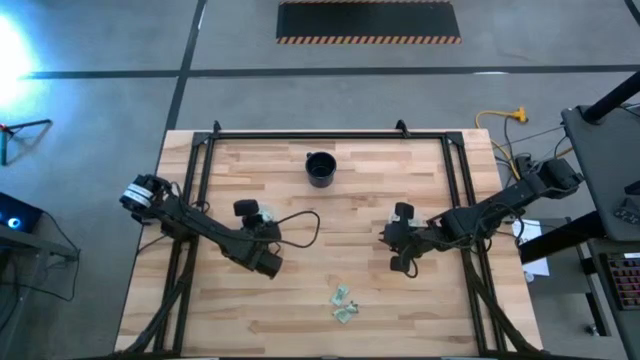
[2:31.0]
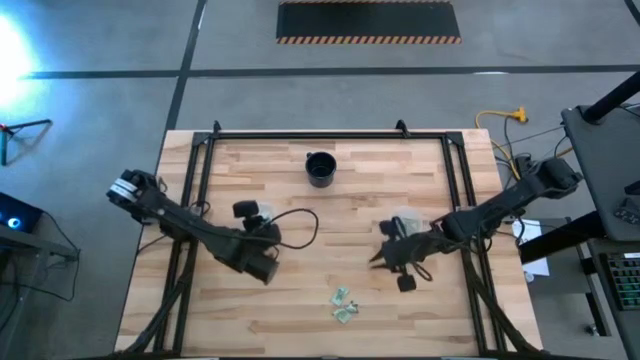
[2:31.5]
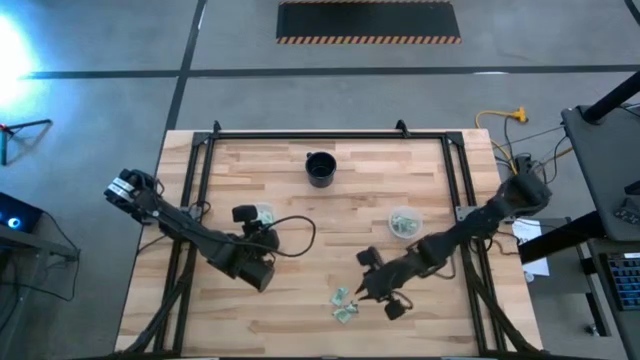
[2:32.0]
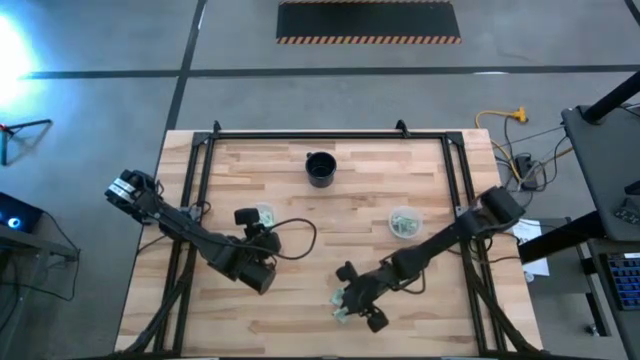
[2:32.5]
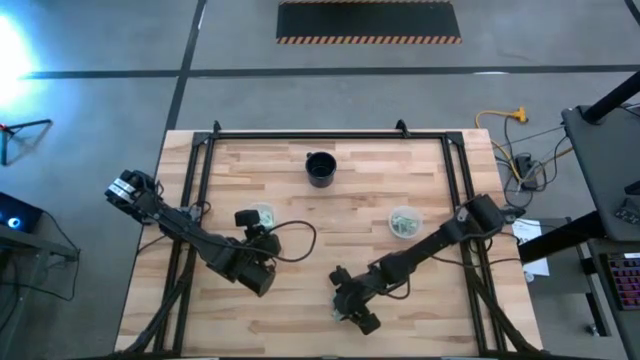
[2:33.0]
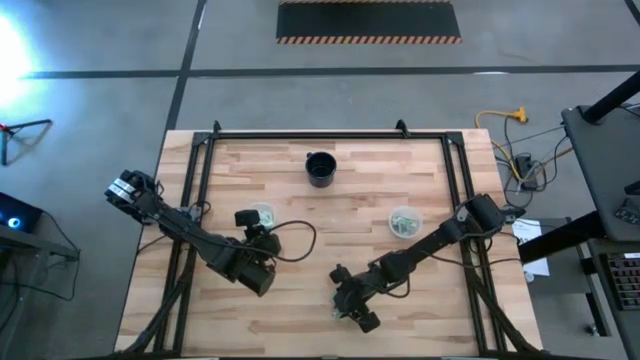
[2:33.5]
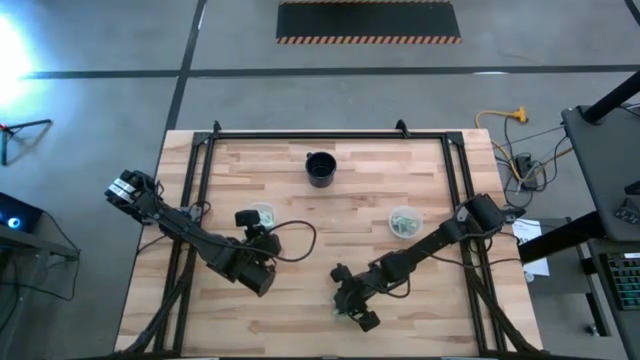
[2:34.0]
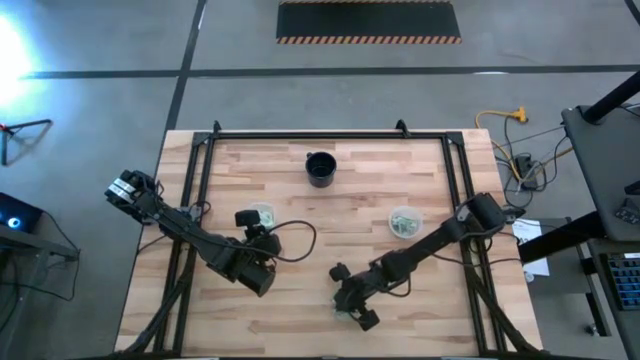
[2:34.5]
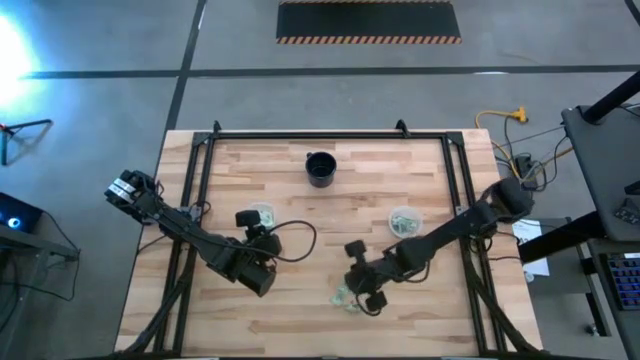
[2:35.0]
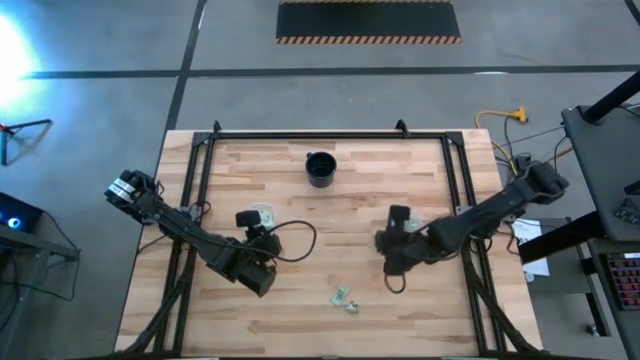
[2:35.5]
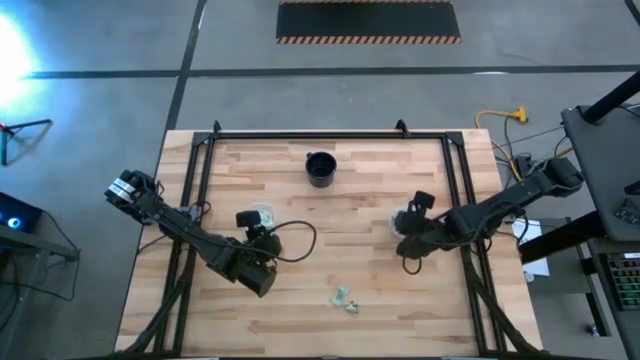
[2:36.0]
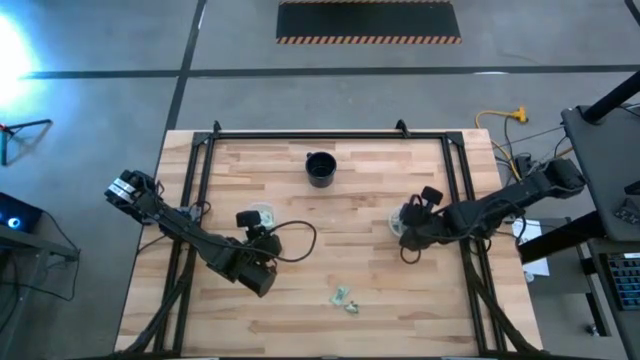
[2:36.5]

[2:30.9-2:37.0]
Task: Pick and place Stevia / Truvia into bins
Put the light green stevia packet into the circular container

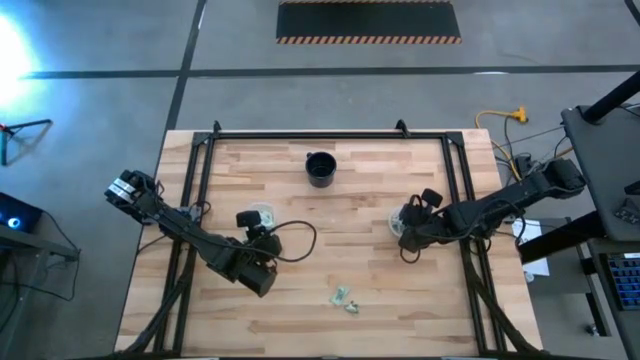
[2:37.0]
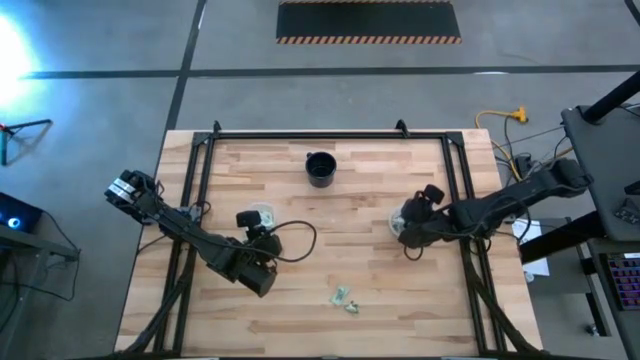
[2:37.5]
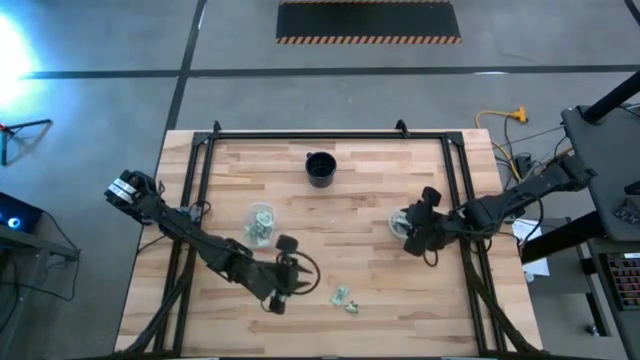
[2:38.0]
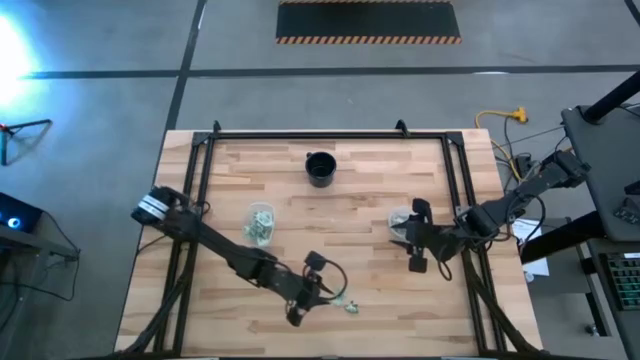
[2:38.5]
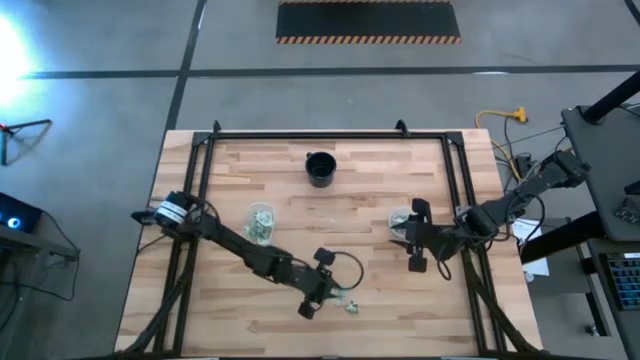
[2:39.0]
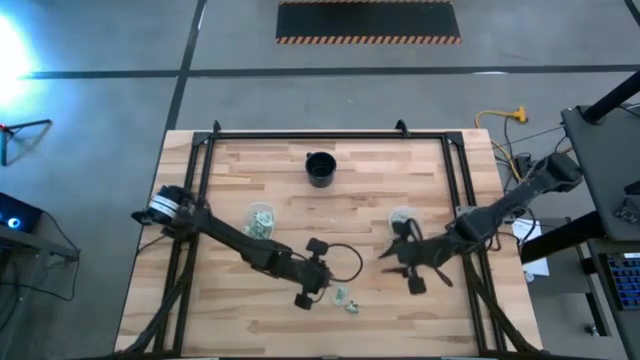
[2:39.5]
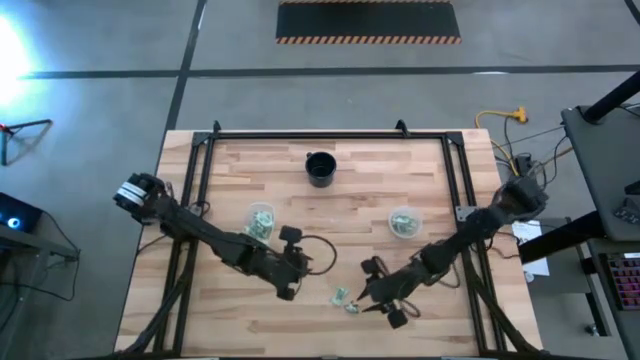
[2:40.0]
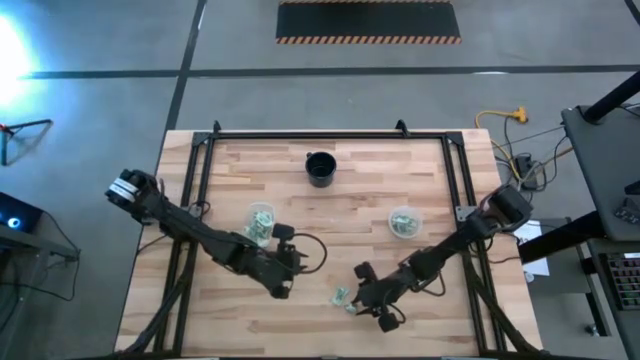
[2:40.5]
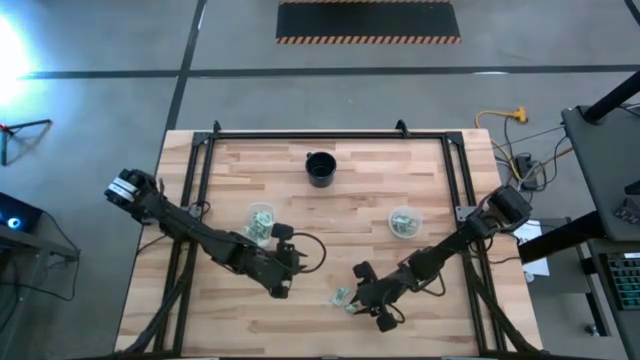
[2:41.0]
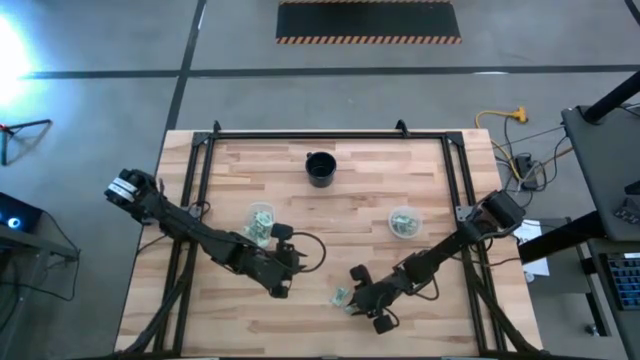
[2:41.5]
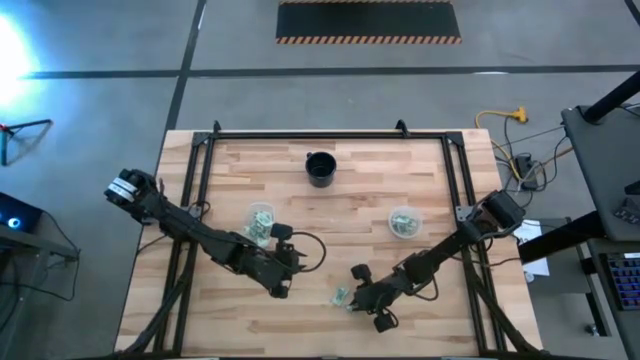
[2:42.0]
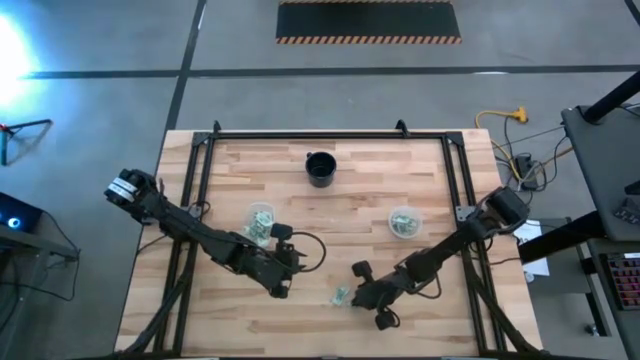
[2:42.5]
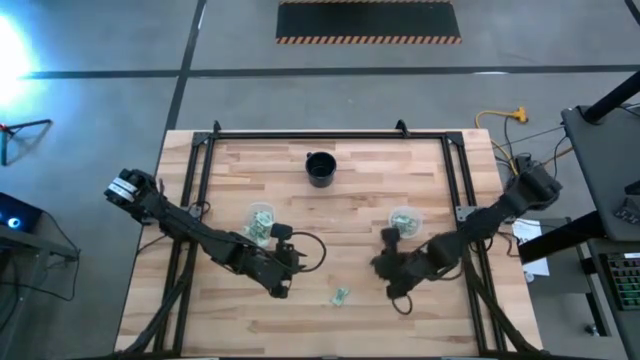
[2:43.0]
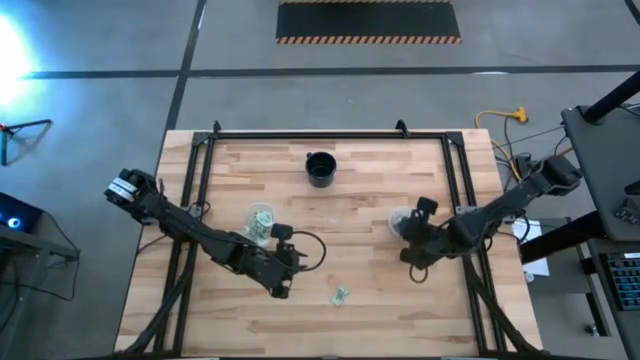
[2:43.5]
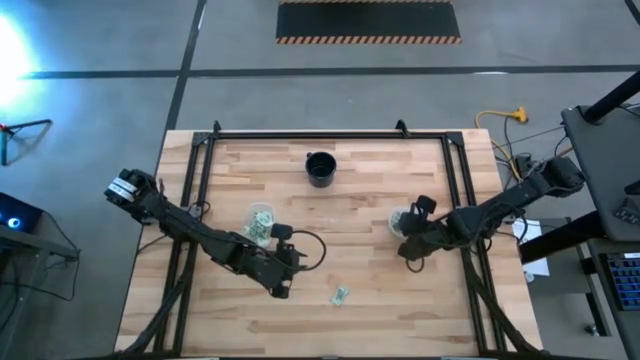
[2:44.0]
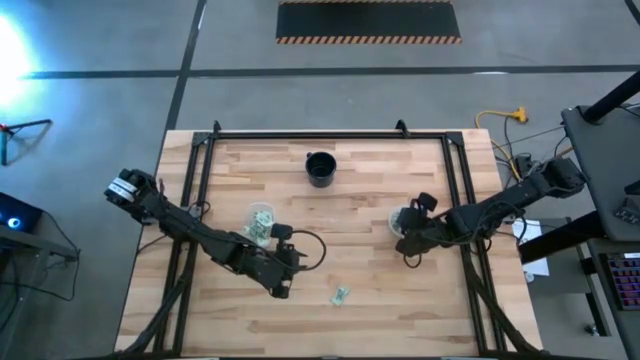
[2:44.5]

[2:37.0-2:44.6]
Put the green stevia packet into the circular container

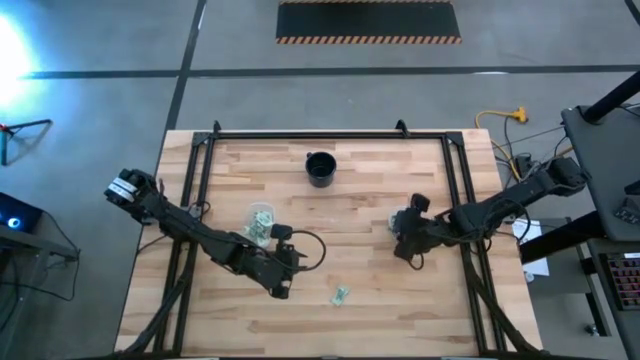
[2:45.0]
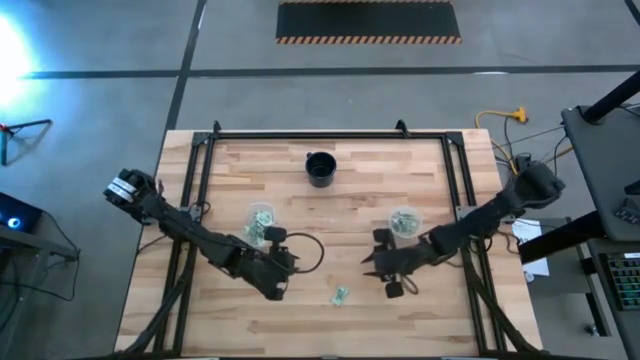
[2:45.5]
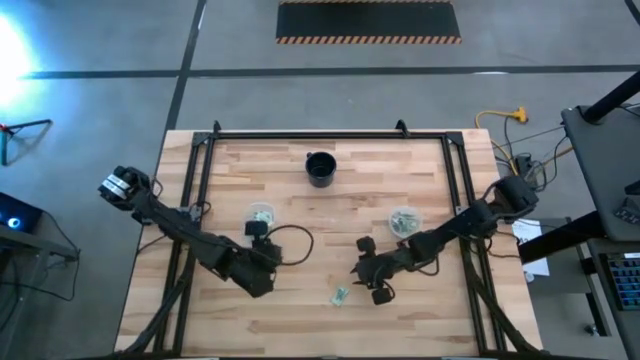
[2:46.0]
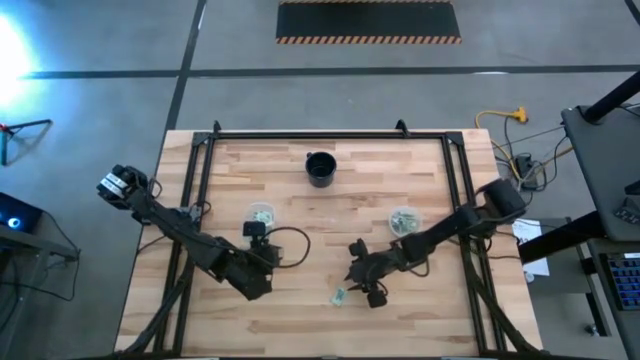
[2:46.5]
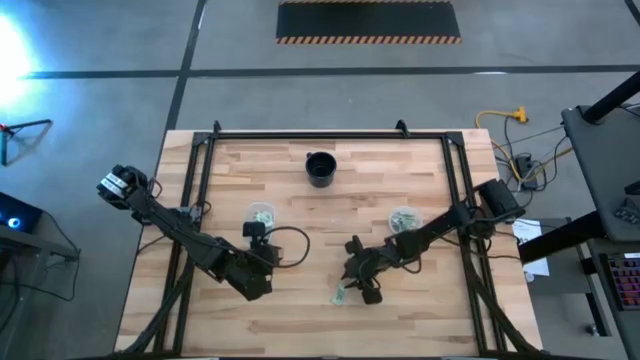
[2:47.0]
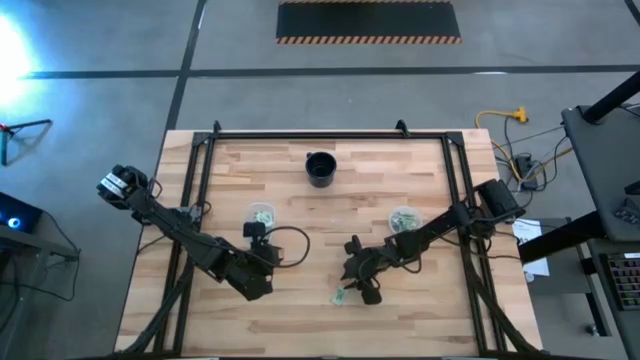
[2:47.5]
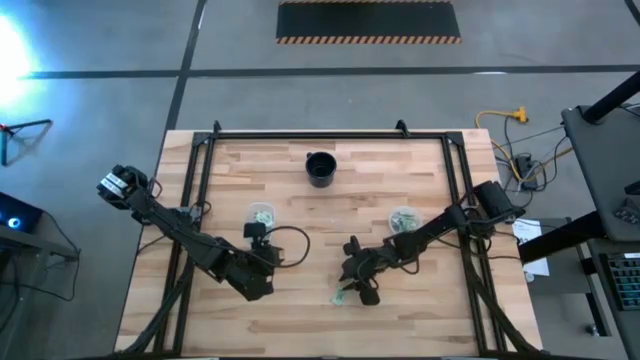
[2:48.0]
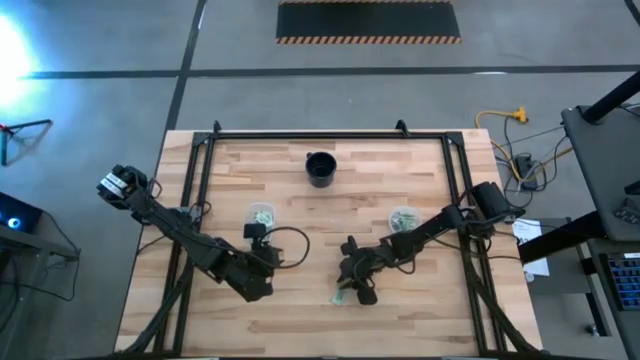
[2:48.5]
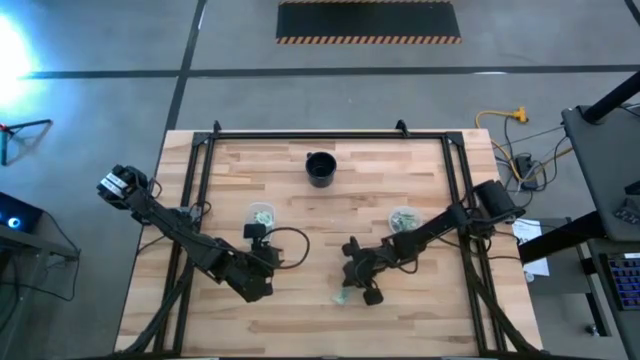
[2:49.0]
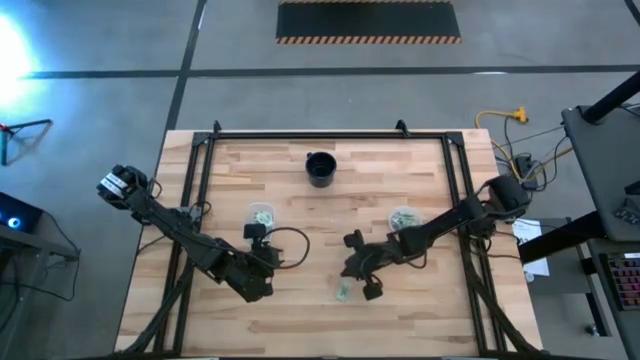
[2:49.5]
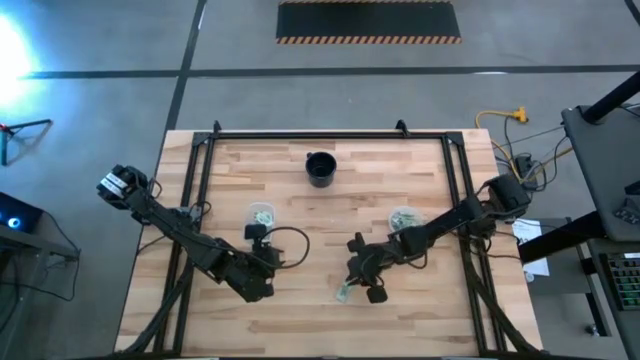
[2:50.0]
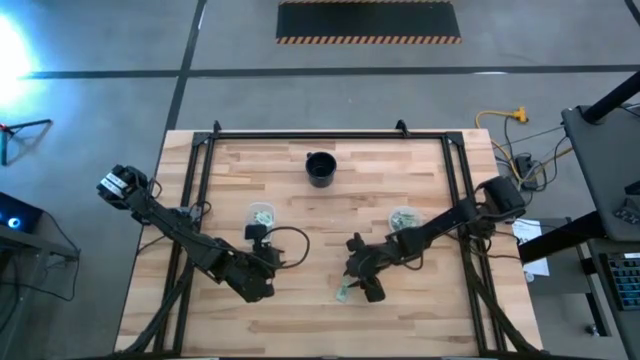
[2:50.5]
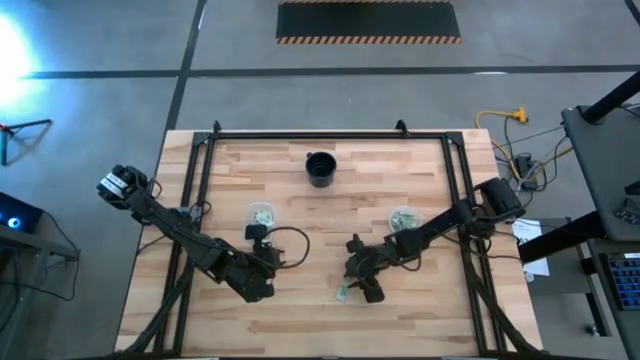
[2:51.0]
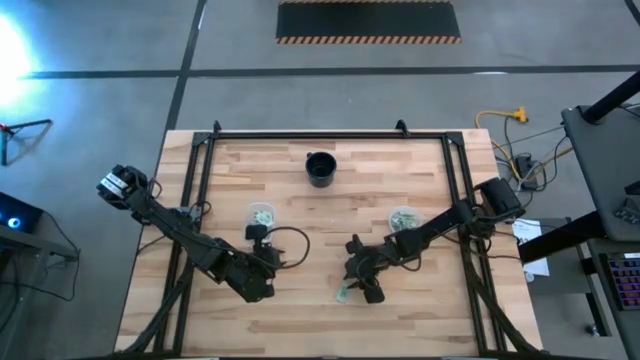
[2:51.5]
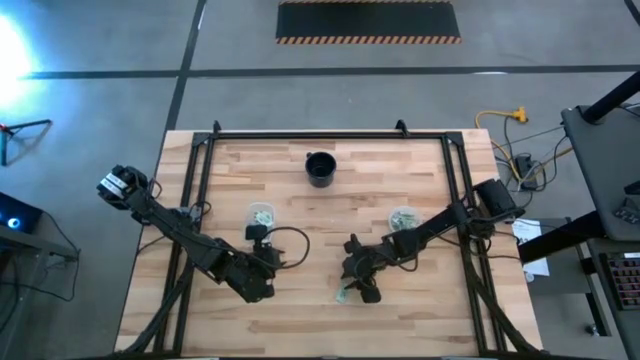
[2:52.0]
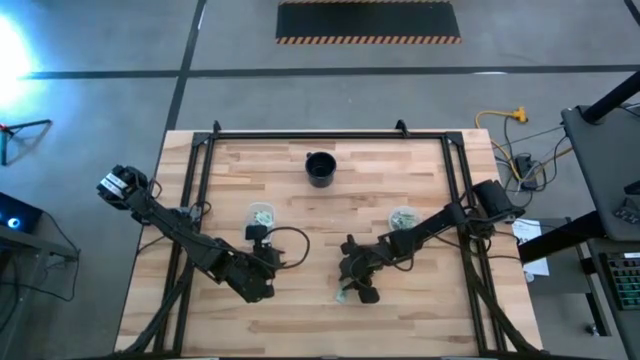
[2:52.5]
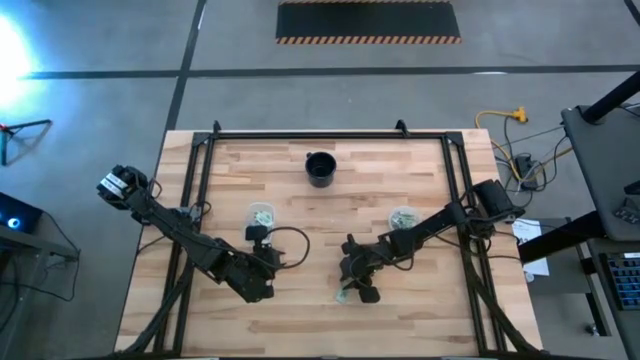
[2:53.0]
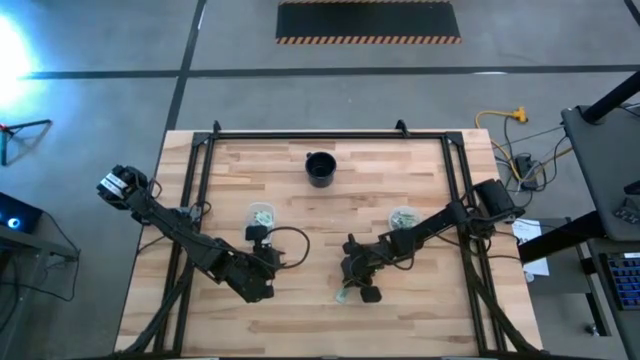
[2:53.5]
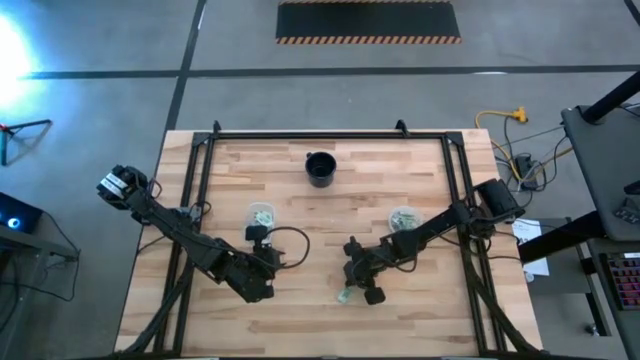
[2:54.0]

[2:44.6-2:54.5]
Put the light green stevia packet into the circular container
